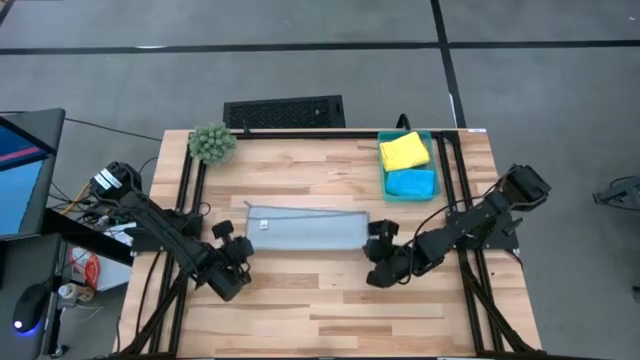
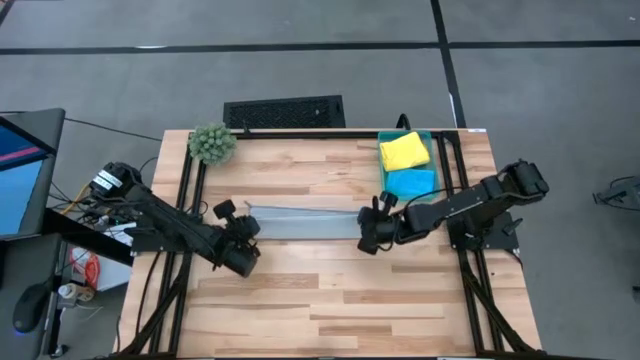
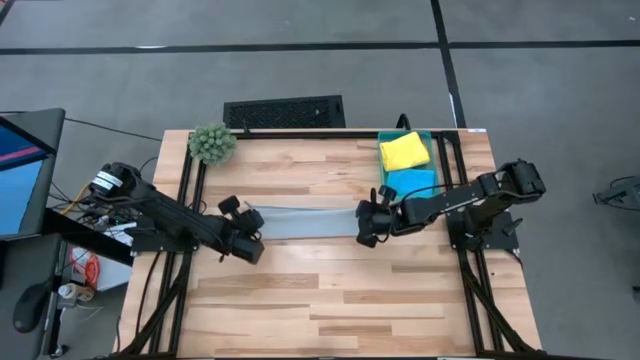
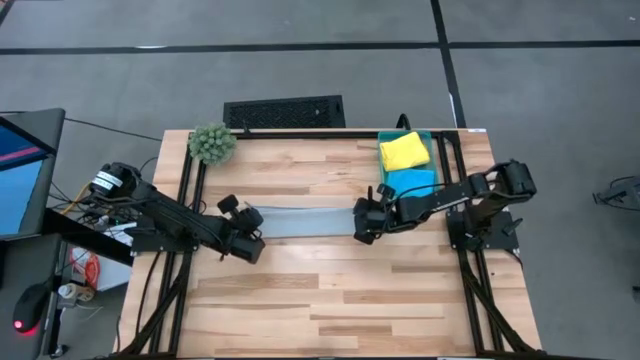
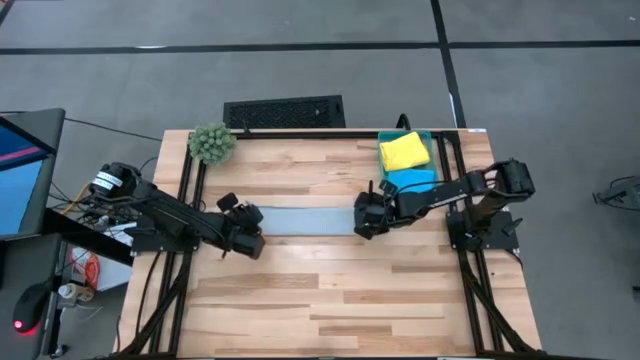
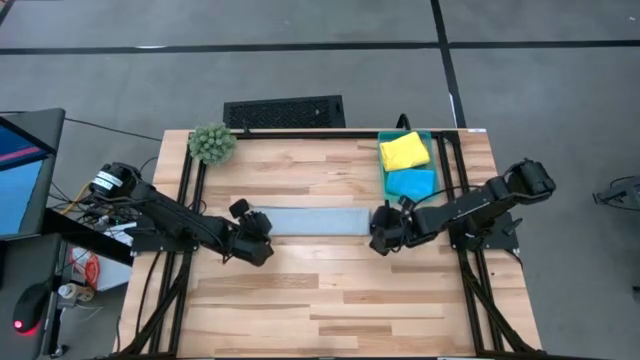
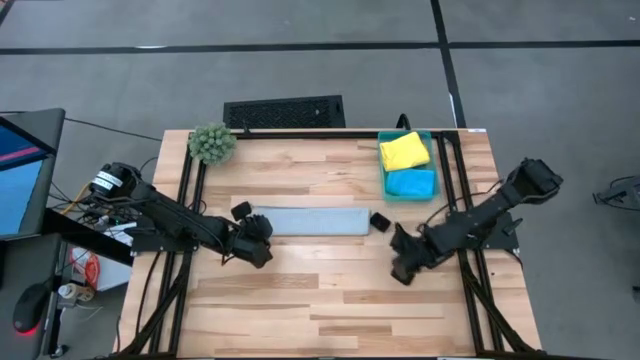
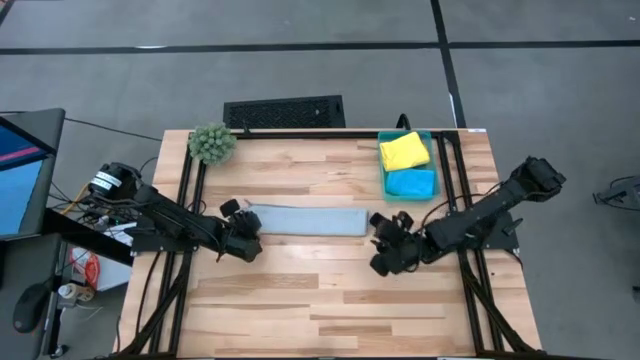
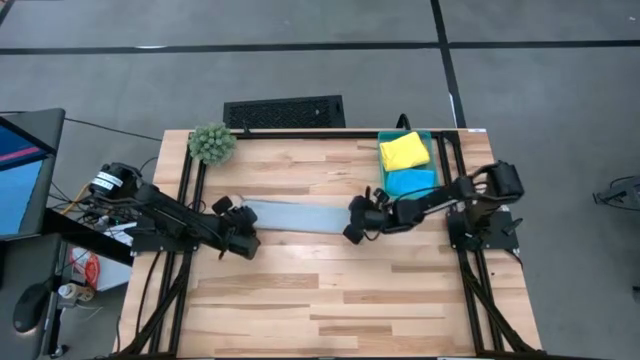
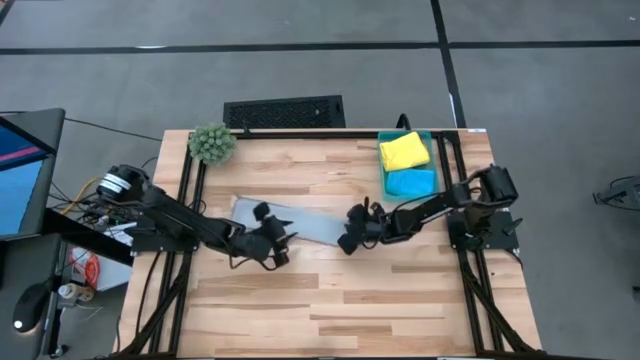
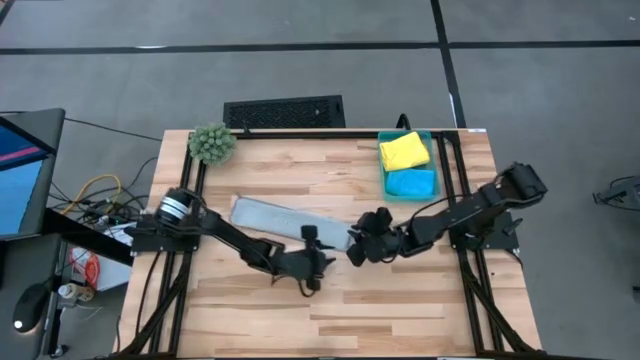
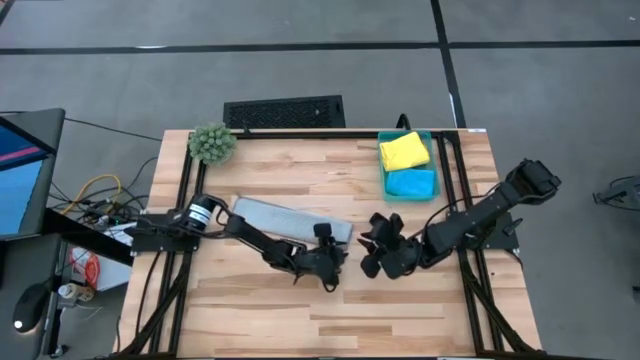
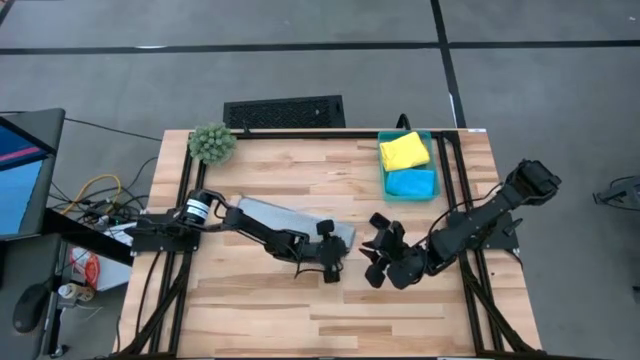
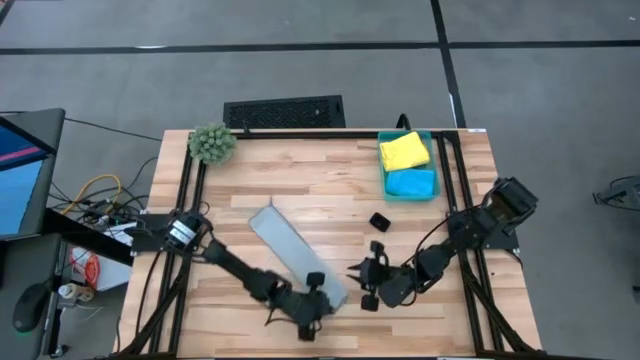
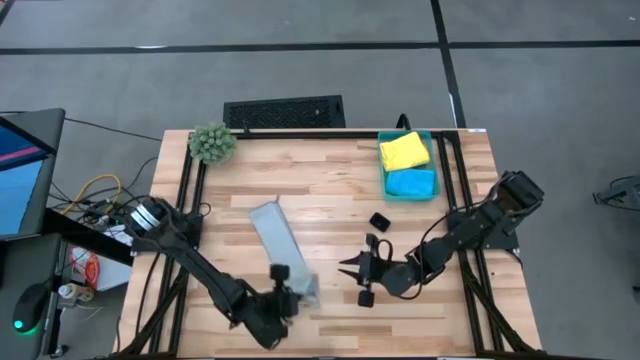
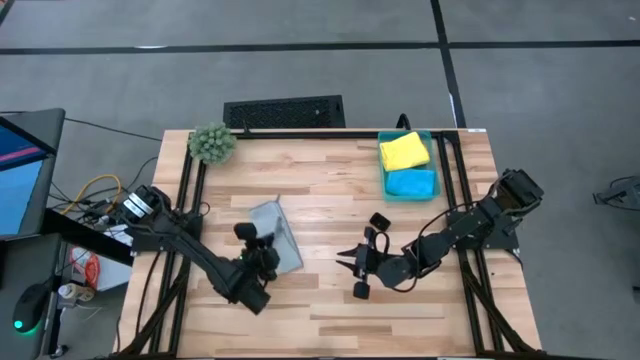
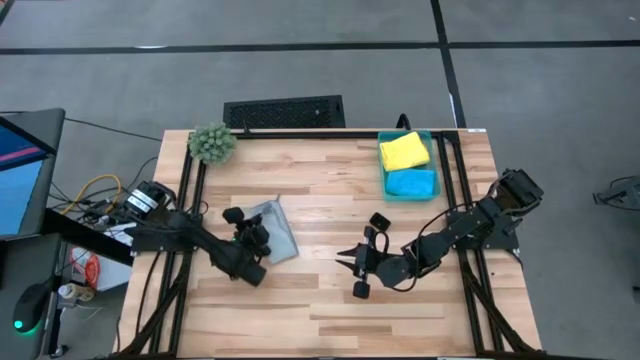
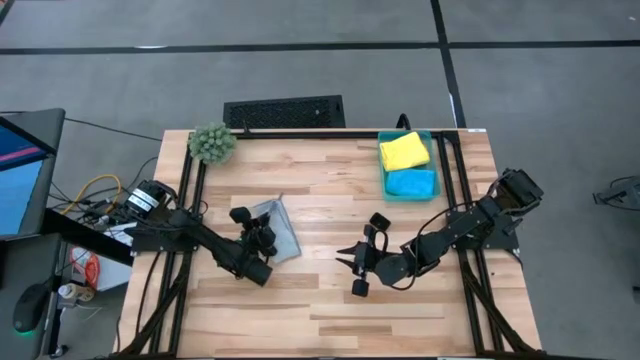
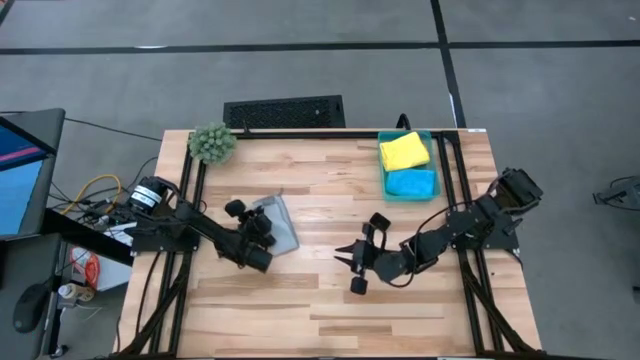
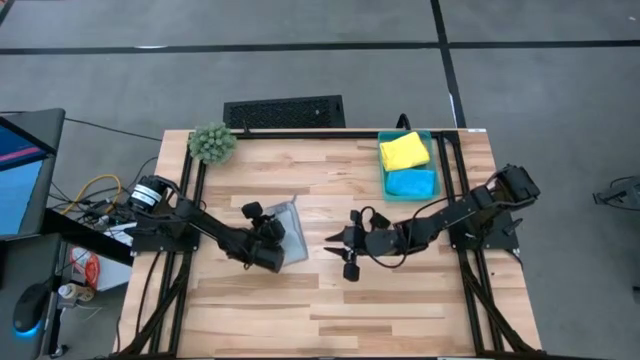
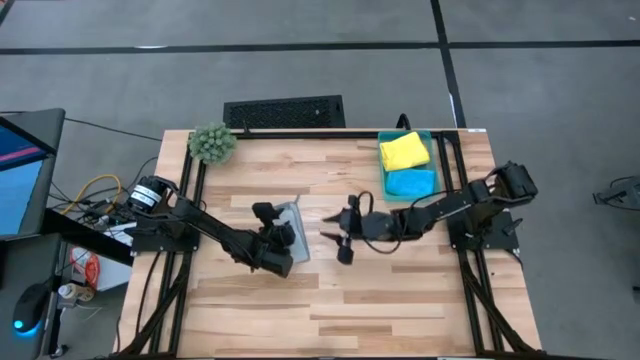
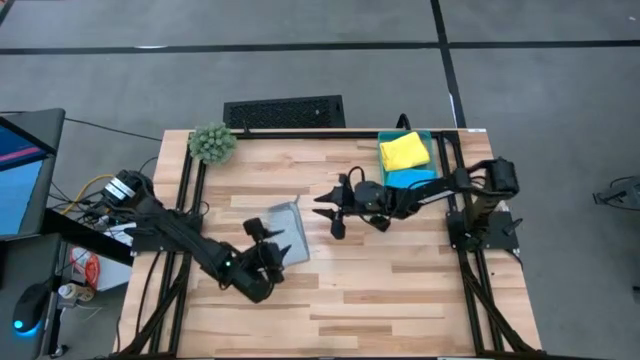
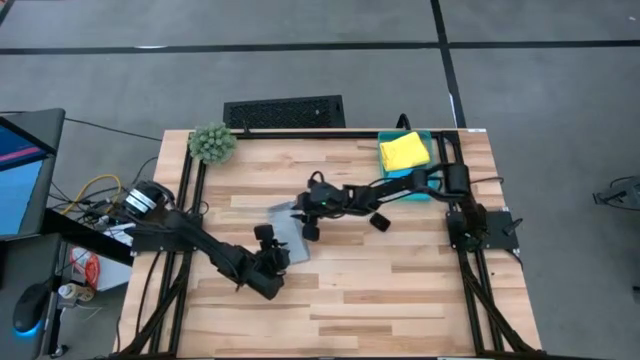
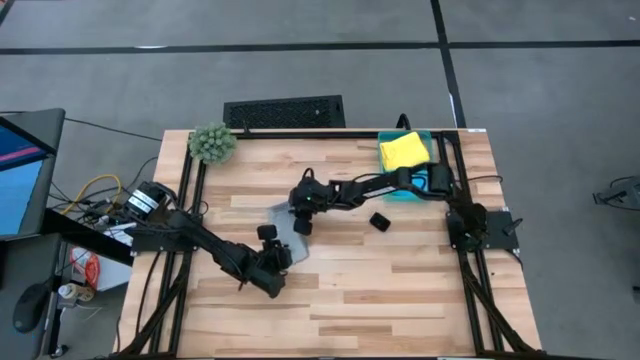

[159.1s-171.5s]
Task: Fold microfiber towels
Fold the gray microfiber cloth

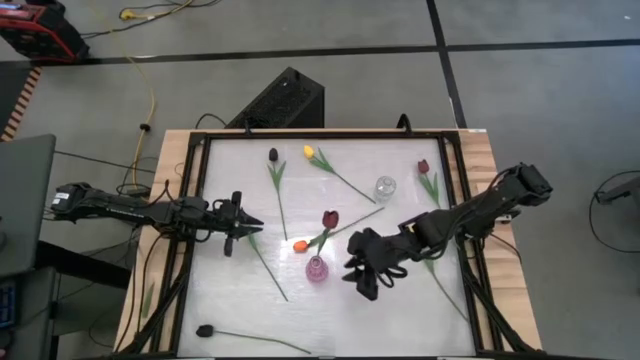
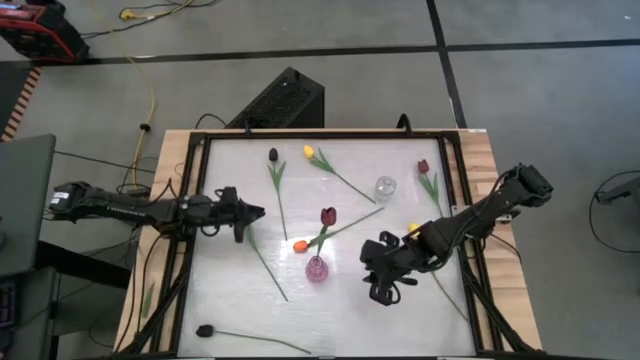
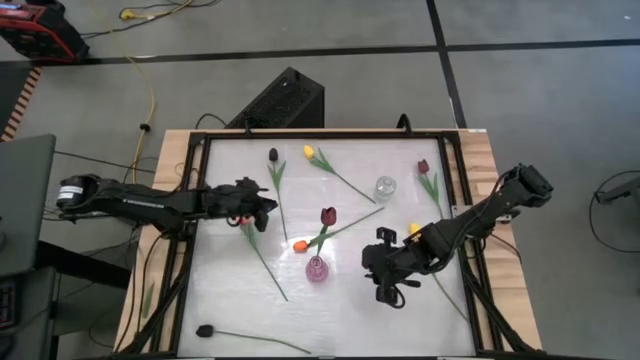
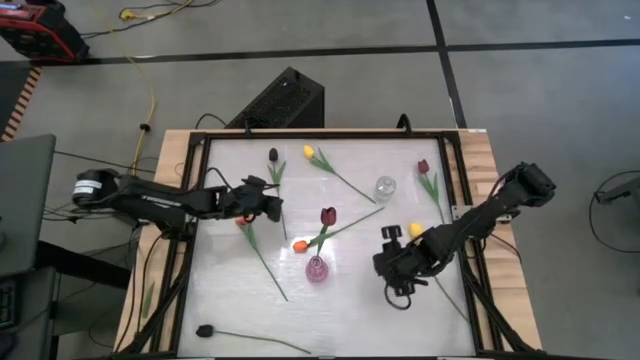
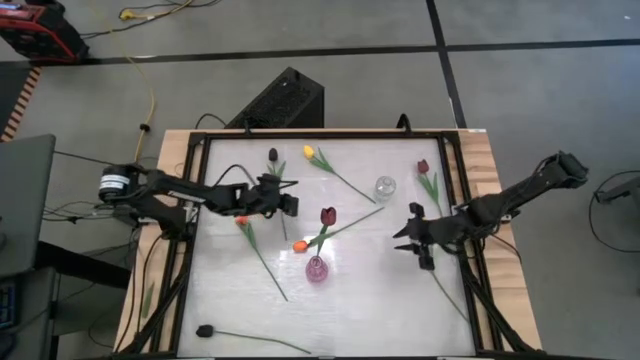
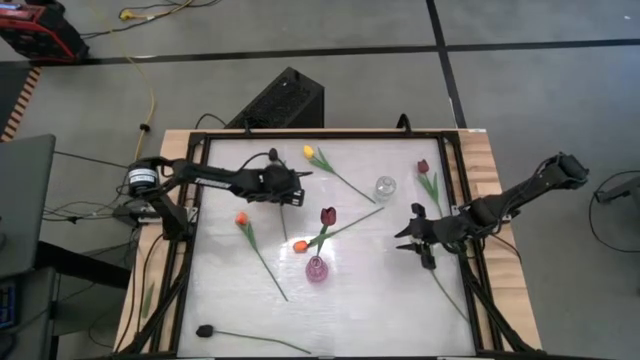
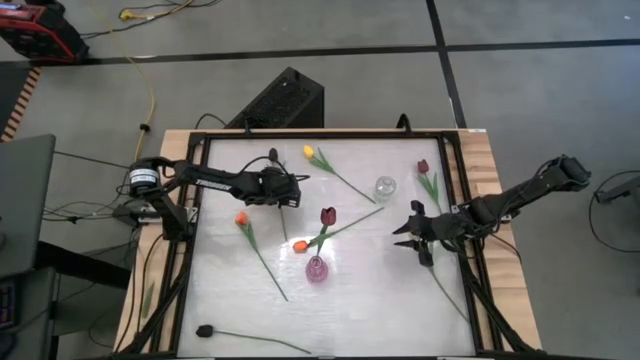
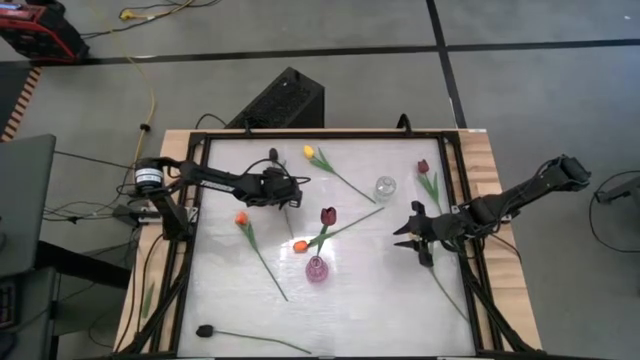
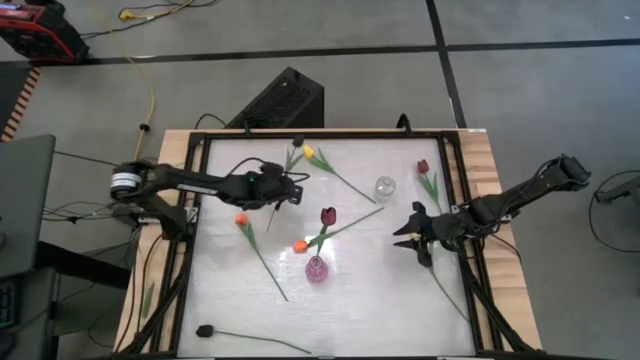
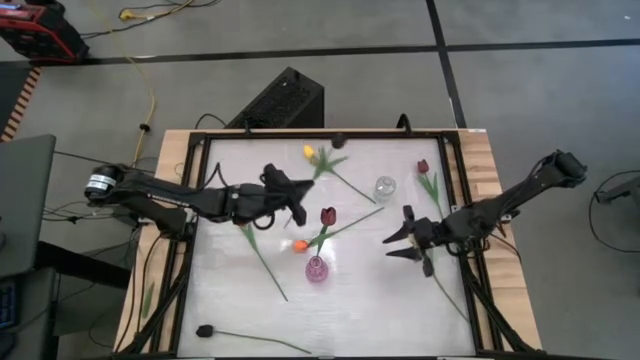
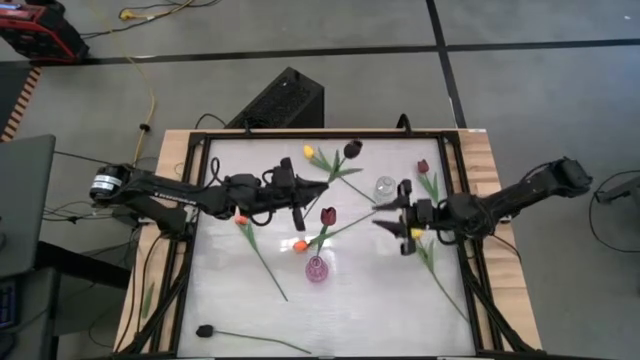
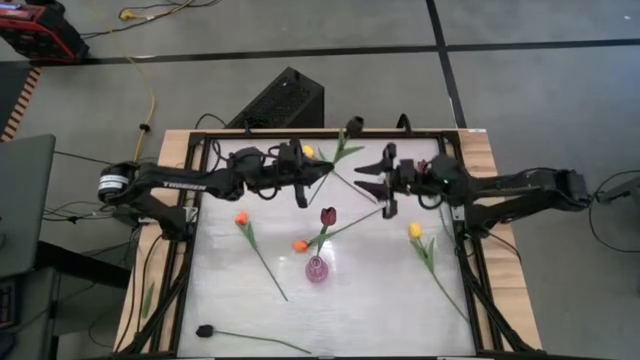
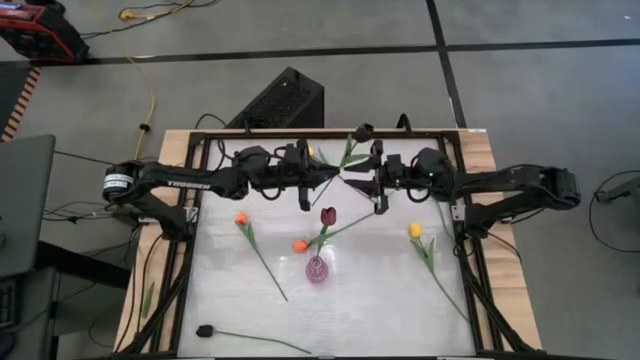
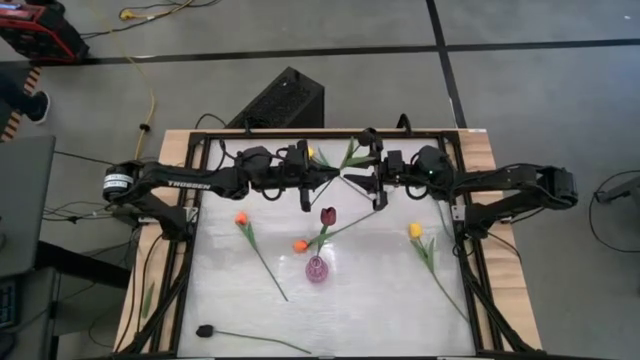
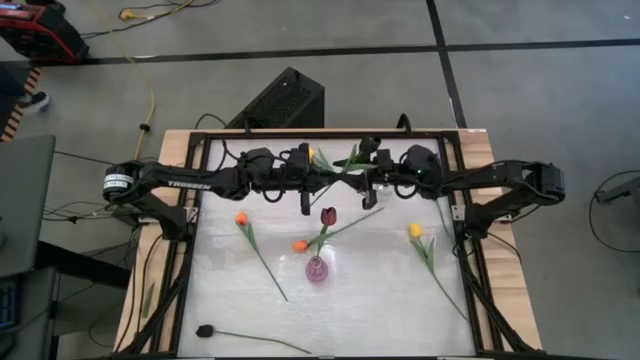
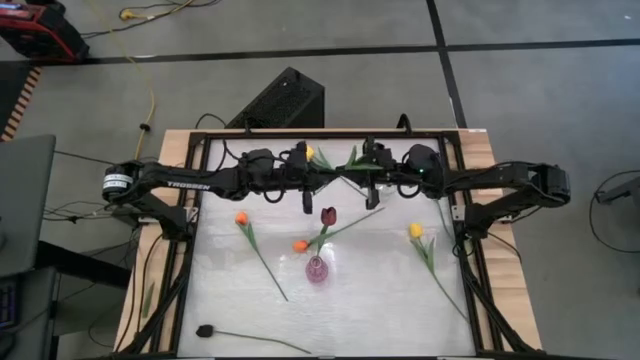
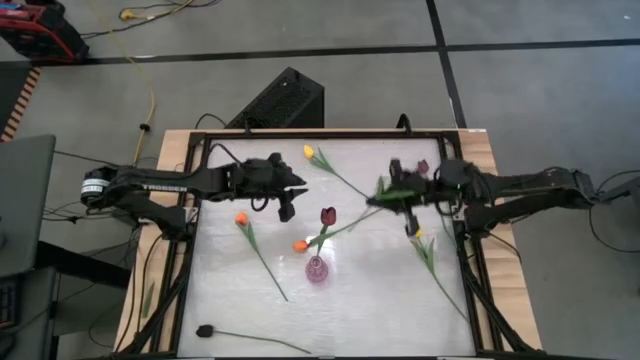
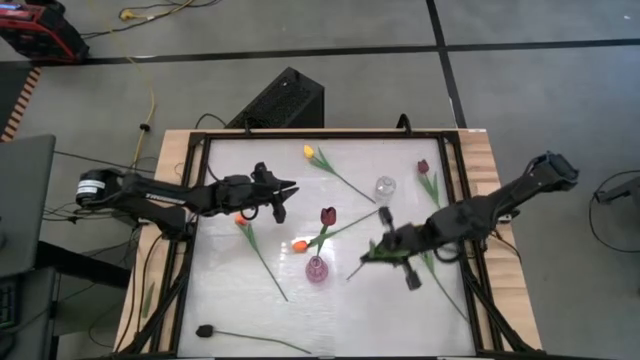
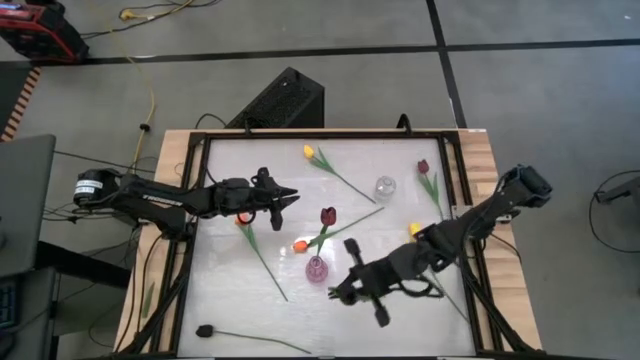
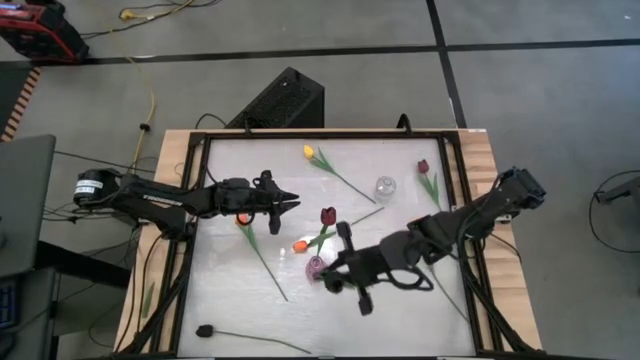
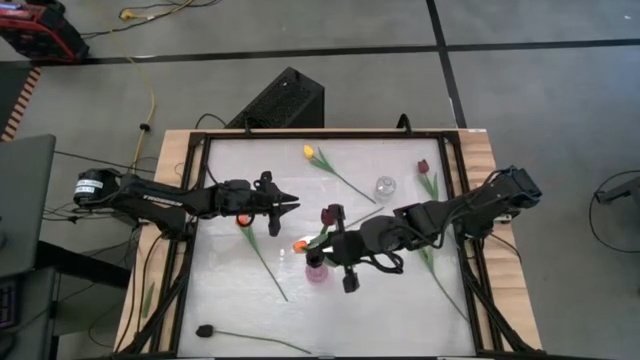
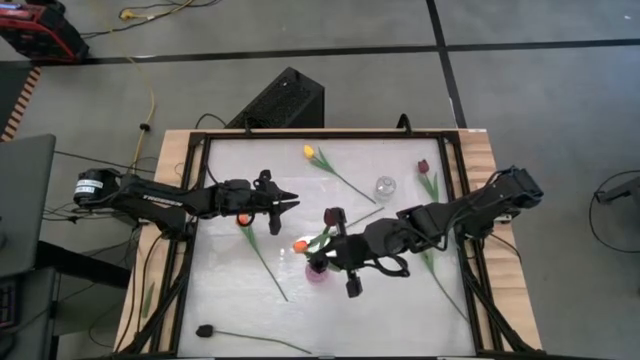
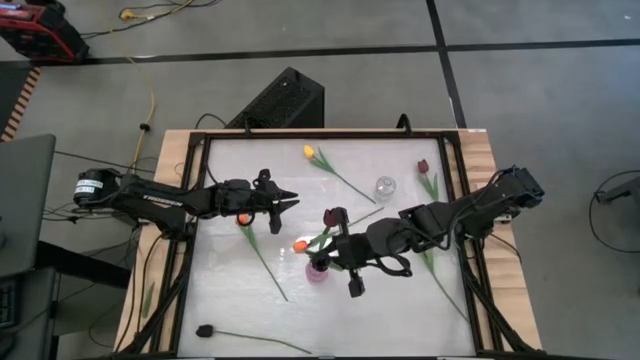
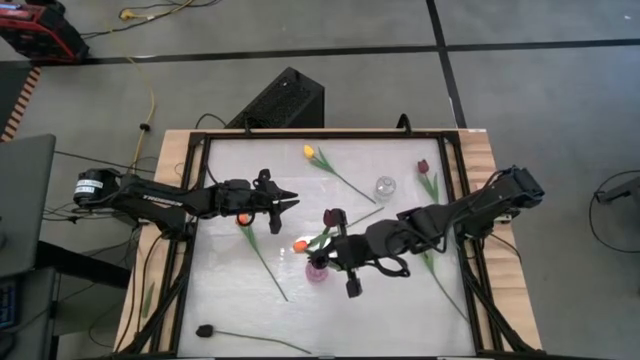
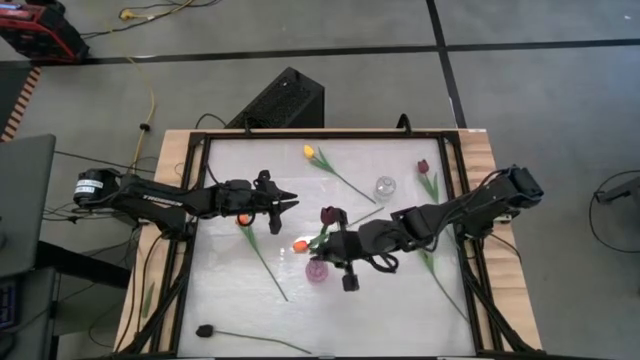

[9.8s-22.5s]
Task: Sort flowers into vase by color
Put the top black flower into the violet vase
